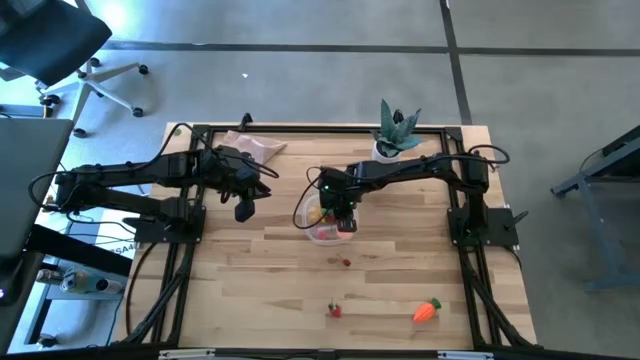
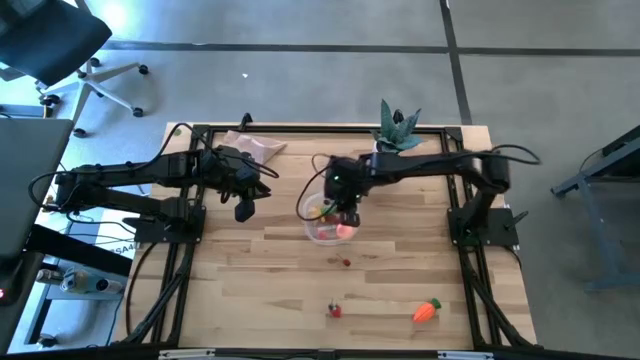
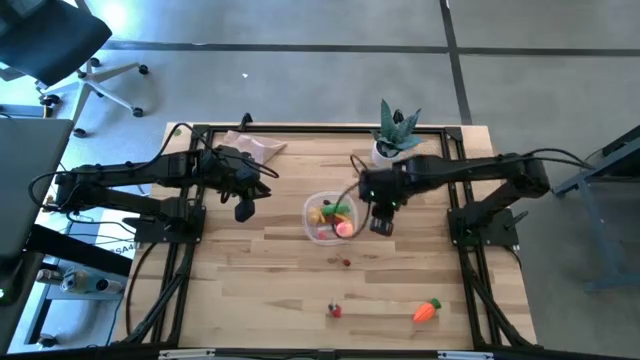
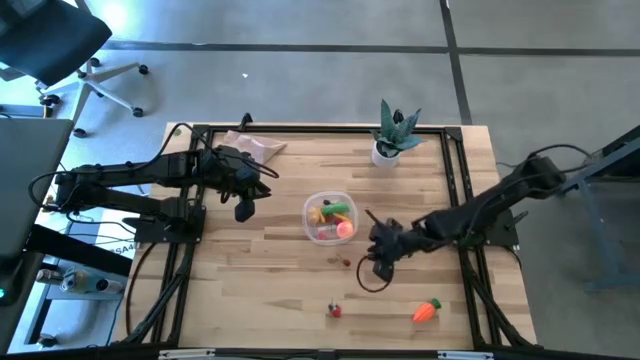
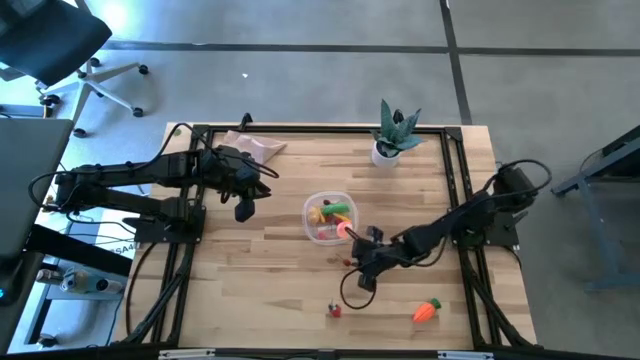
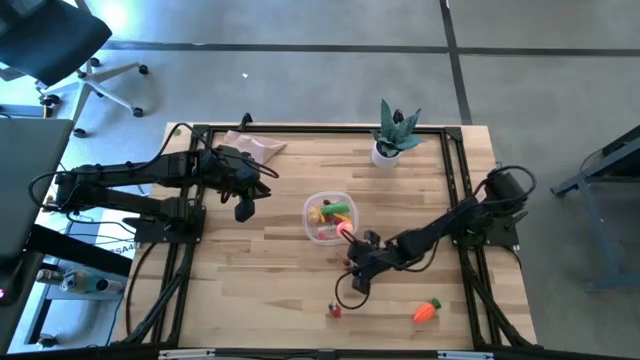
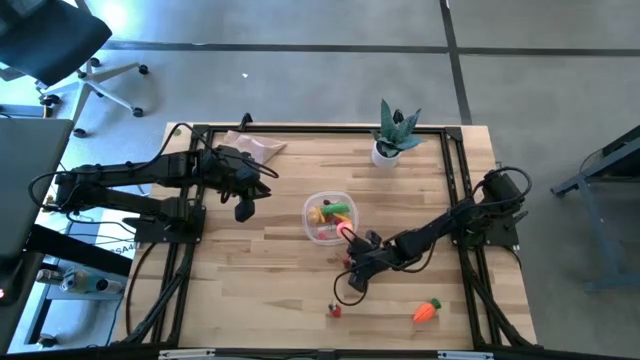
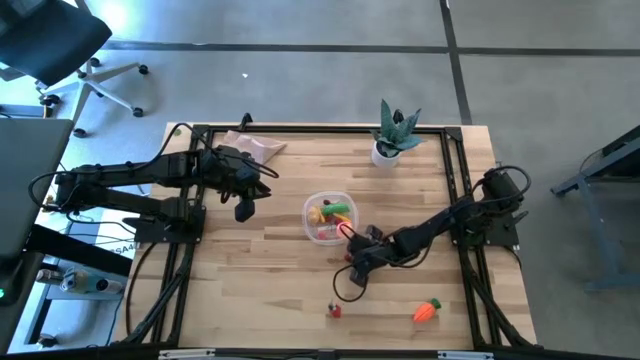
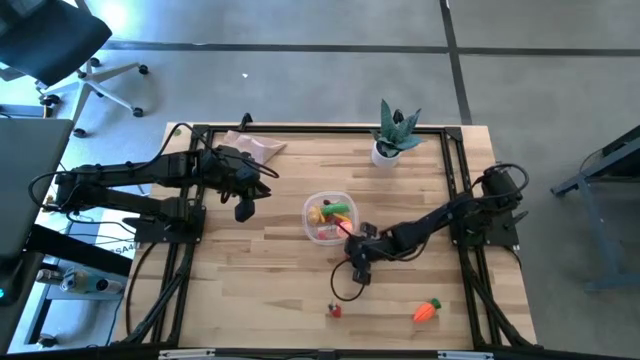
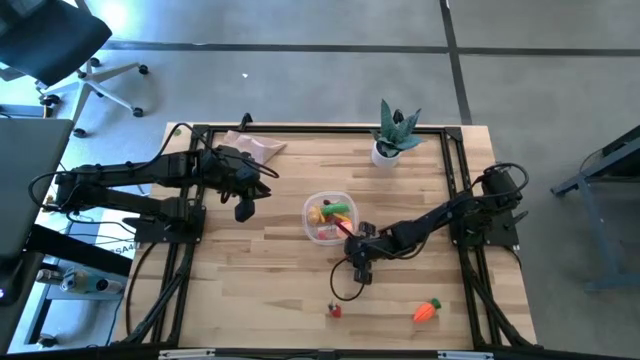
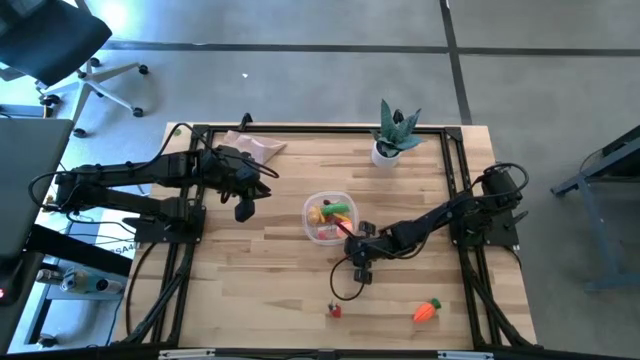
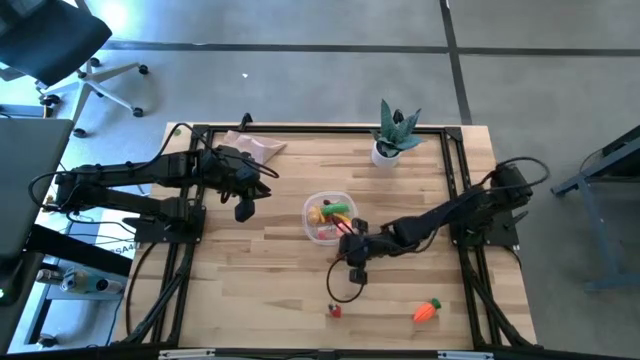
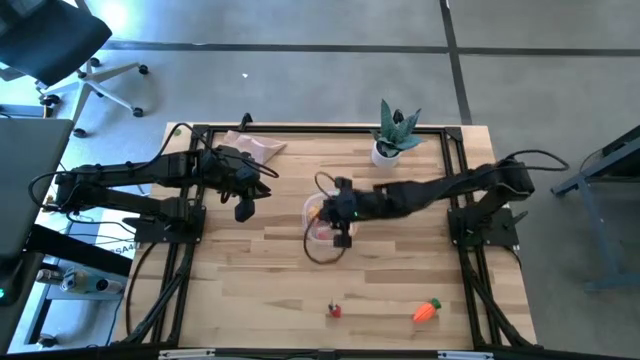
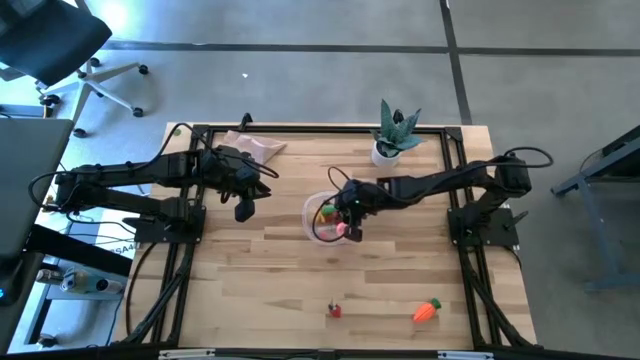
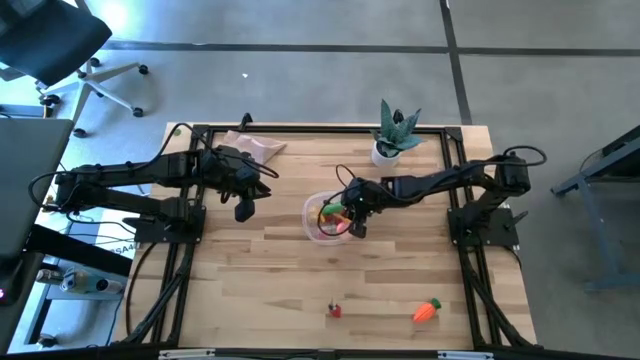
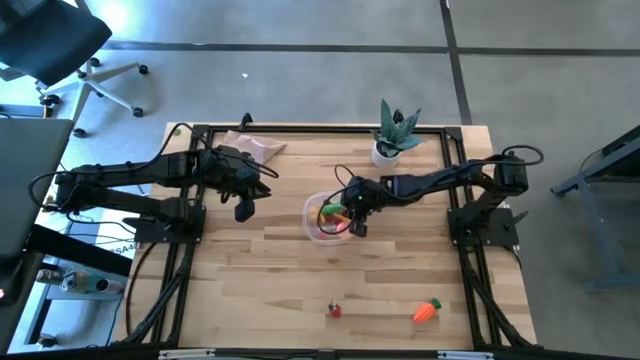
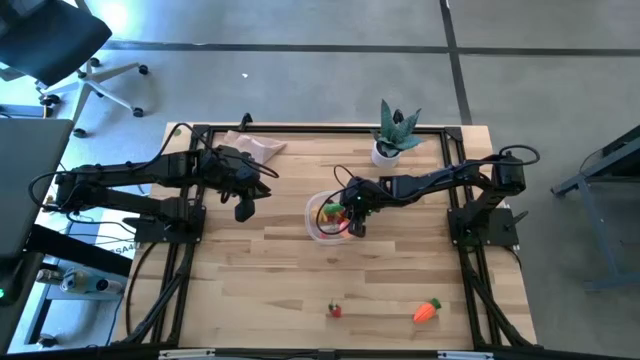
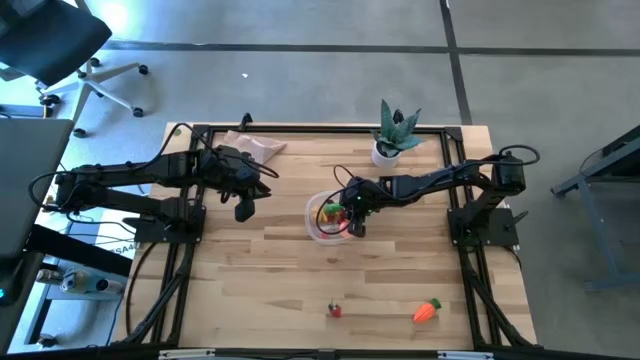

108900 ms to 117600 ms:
Task: Pick and placing Produce into tupperware
Put the red cherry into the transparent bin

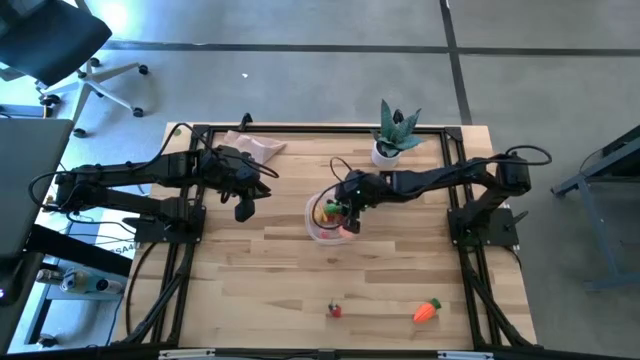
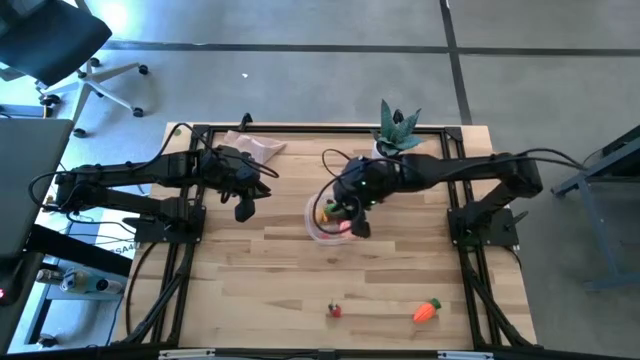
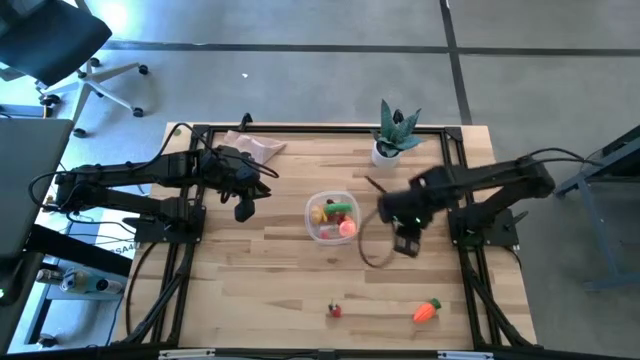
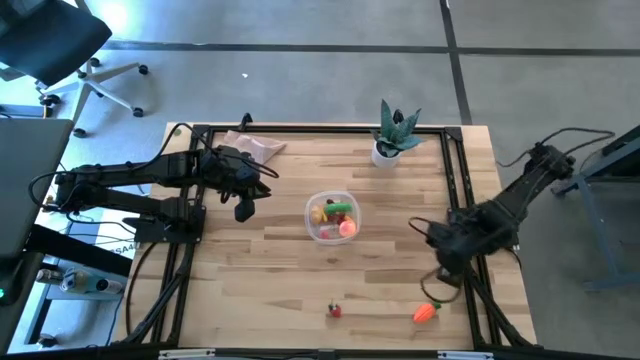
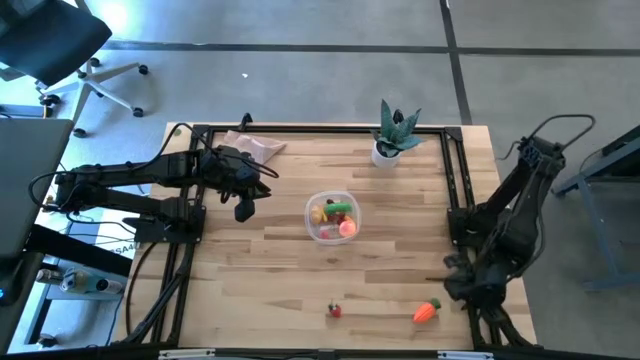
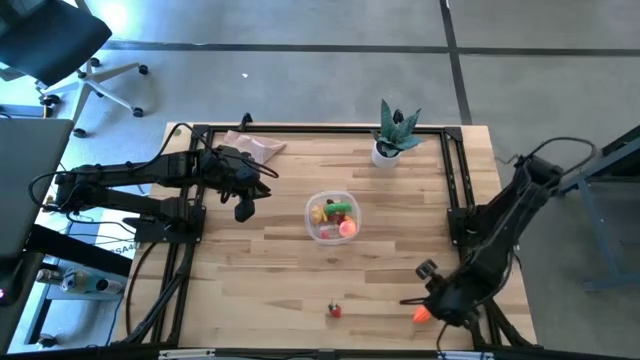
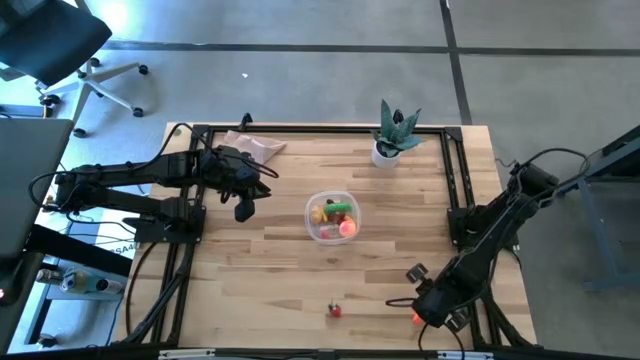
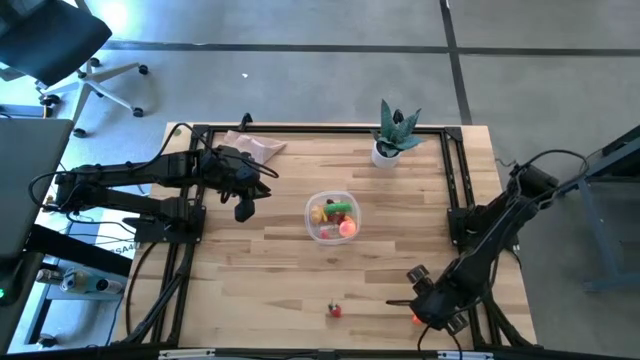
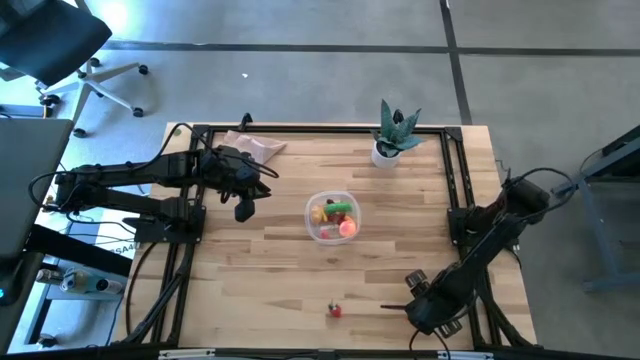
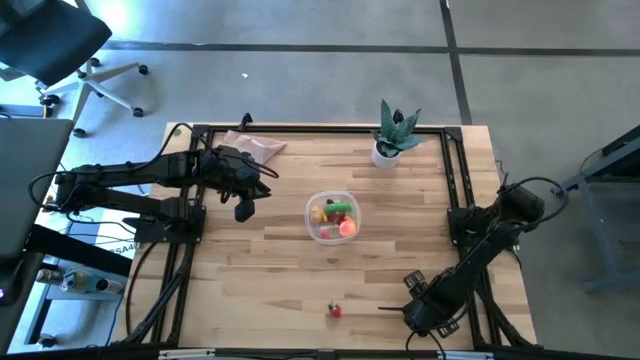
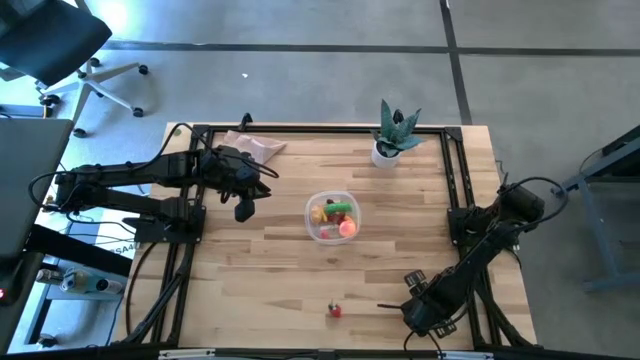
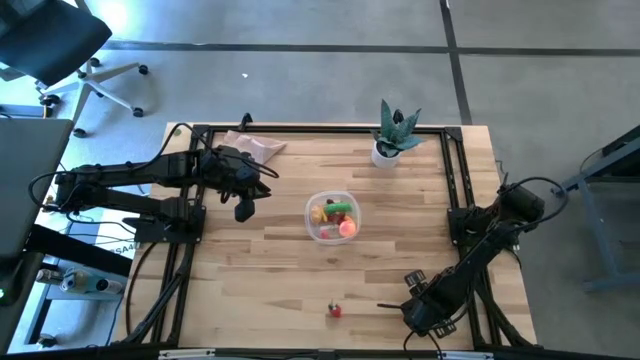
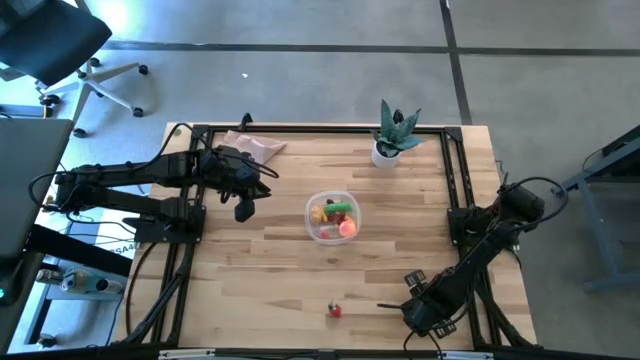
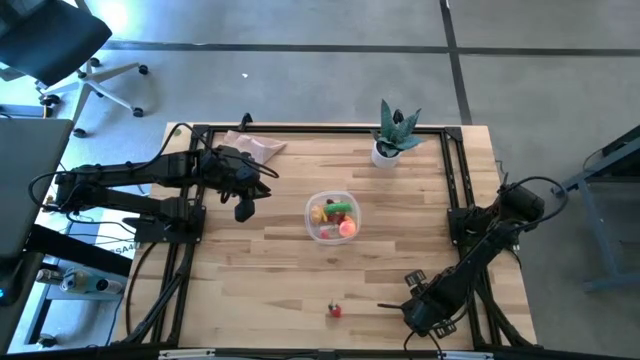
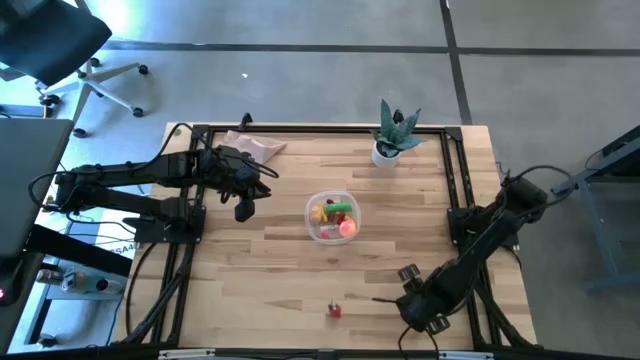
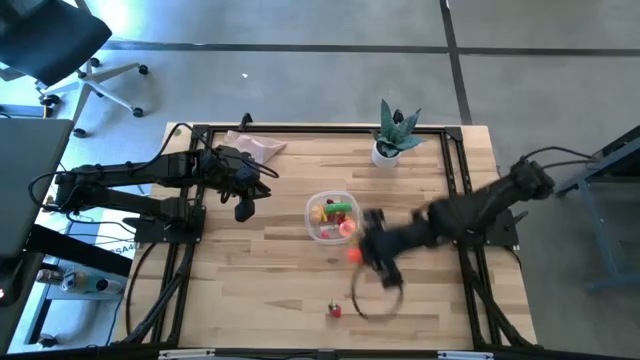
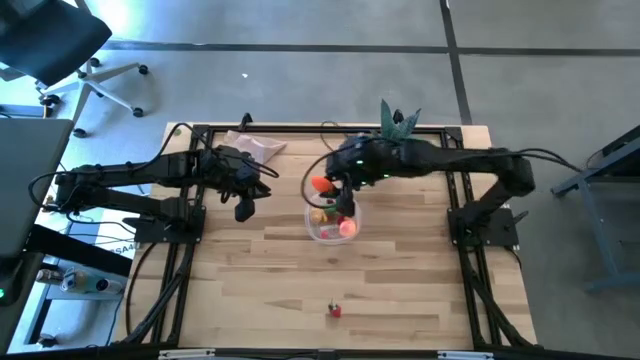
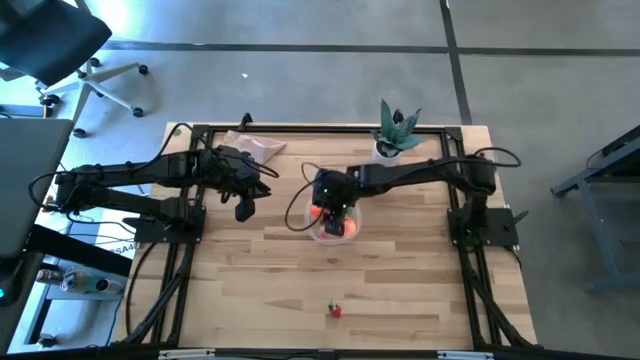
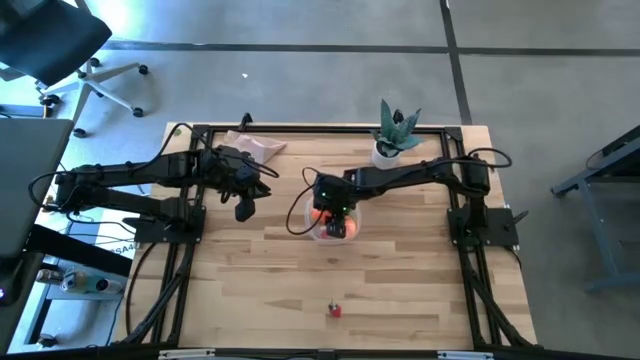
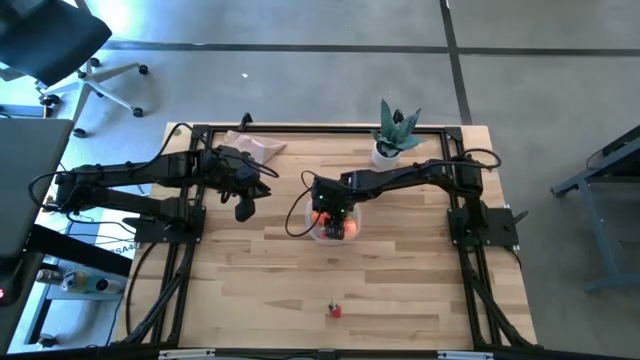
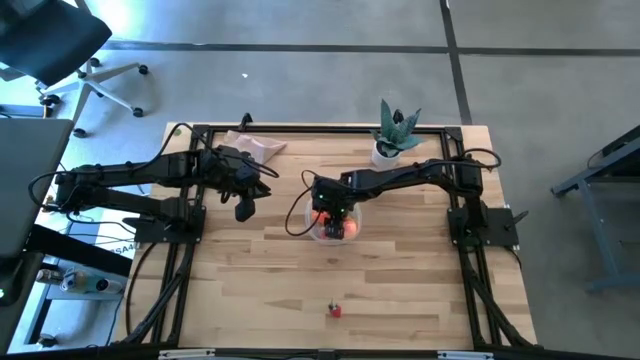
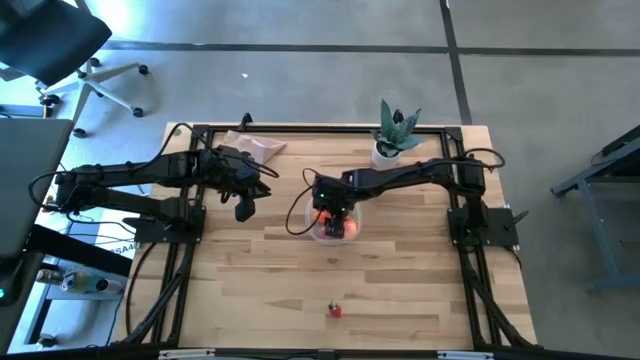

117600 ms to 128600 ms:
Put the carrot into the transparent bin

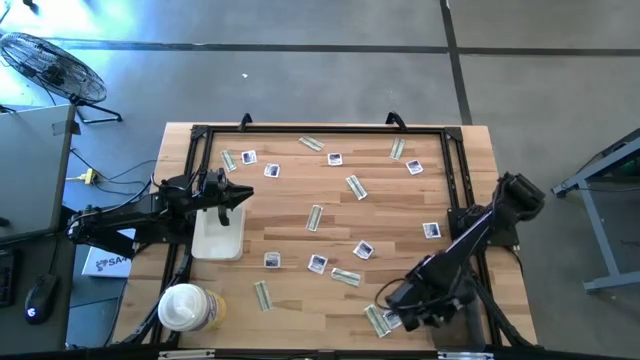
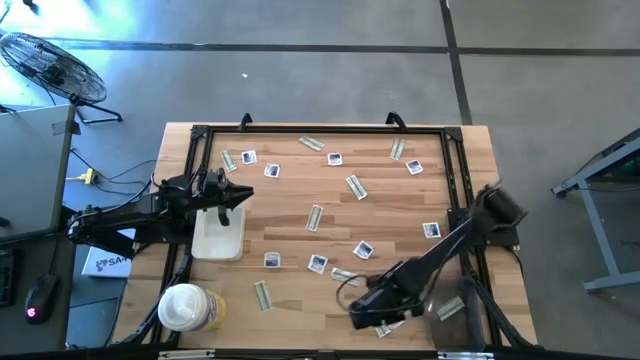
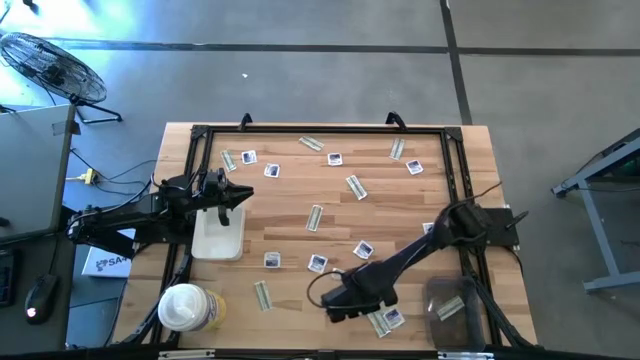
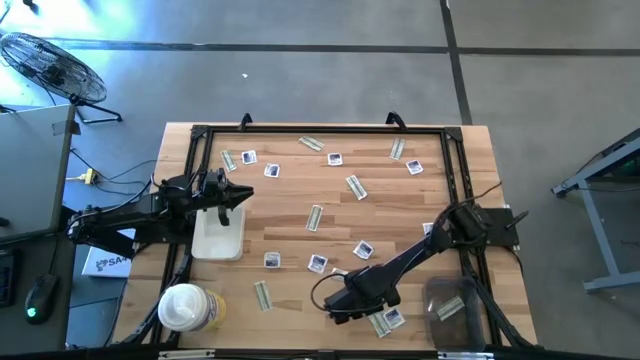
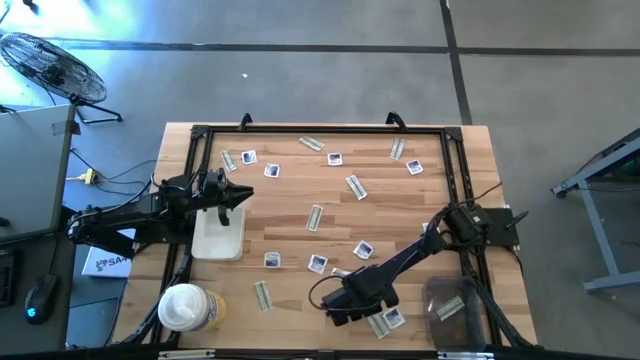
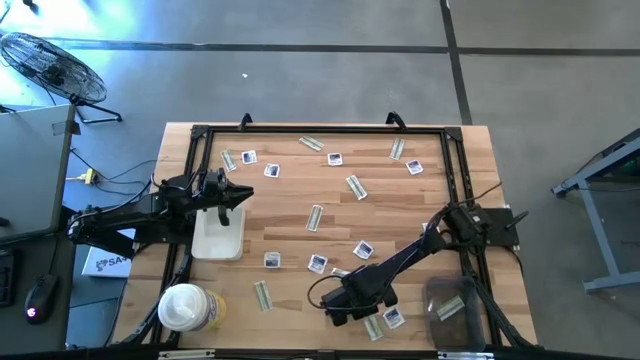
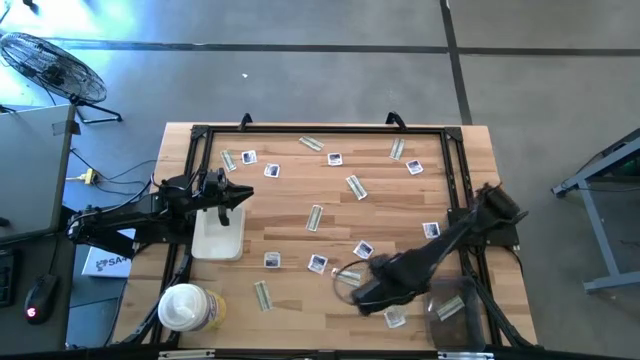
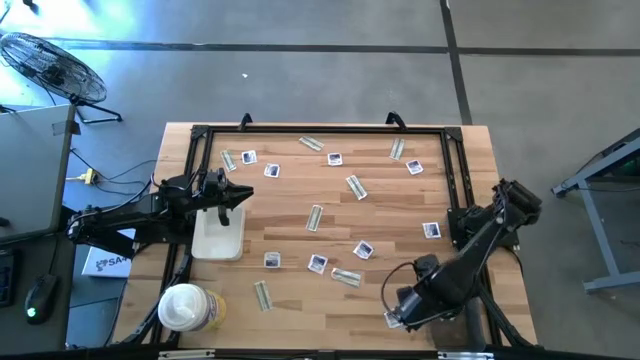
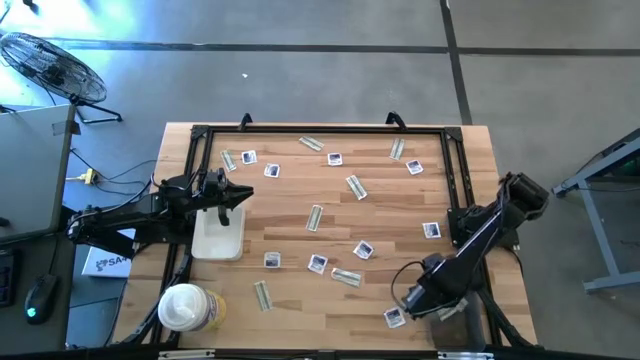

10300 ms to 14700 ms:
Task: Pick & Place First Aid Supplies
Put the green bandage pack into the black bin
